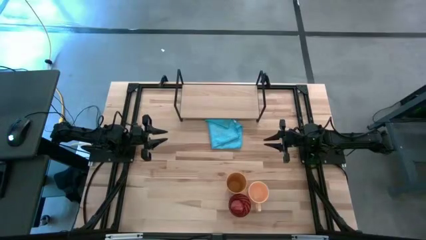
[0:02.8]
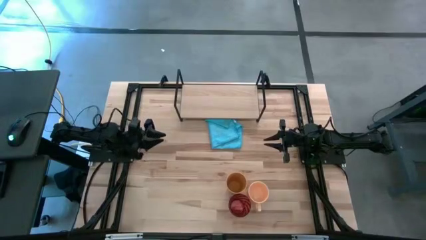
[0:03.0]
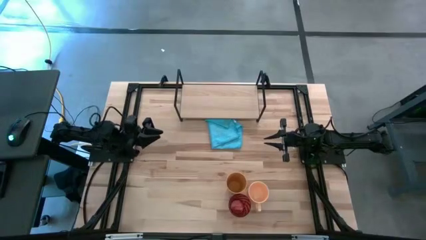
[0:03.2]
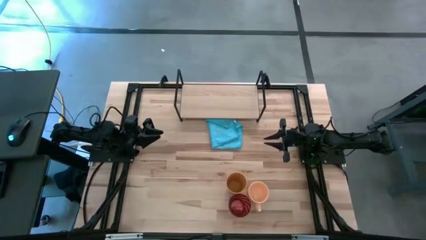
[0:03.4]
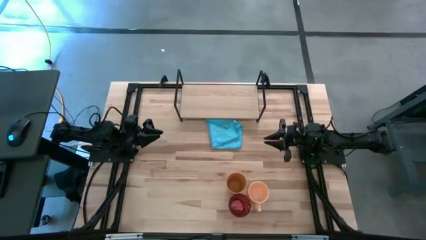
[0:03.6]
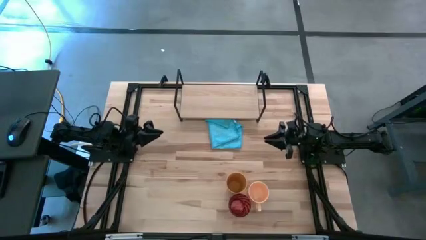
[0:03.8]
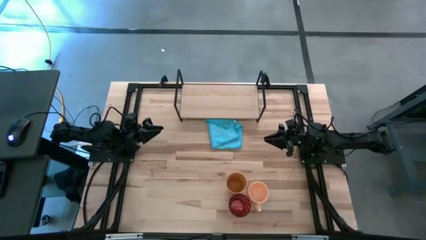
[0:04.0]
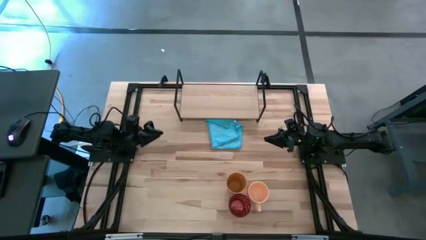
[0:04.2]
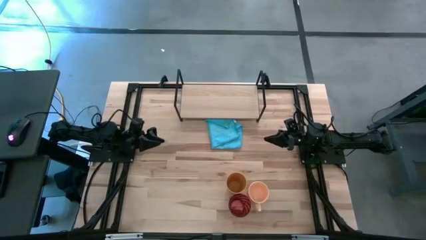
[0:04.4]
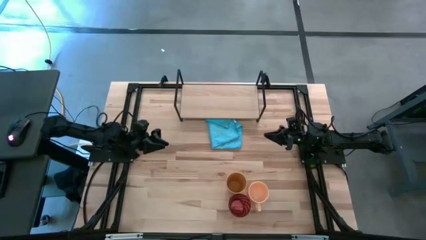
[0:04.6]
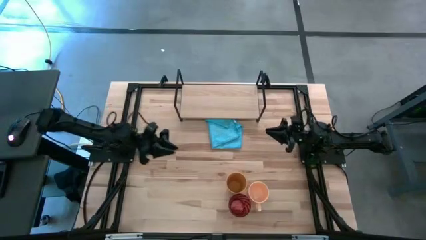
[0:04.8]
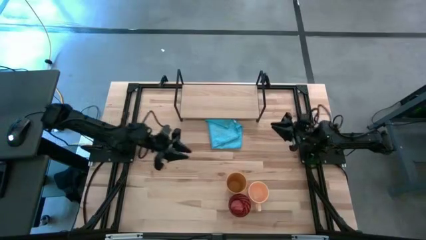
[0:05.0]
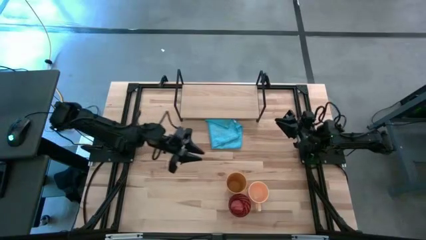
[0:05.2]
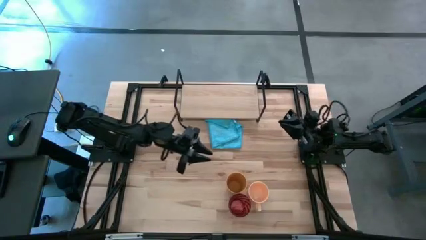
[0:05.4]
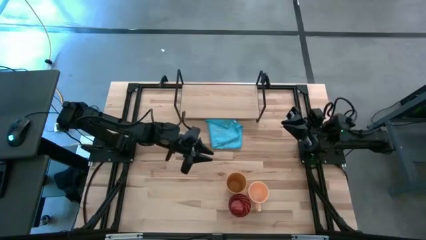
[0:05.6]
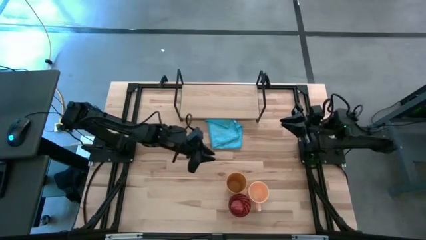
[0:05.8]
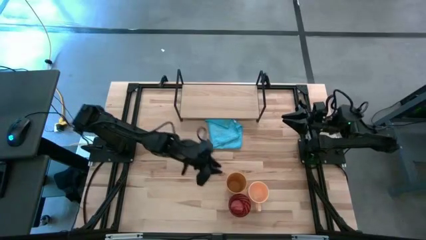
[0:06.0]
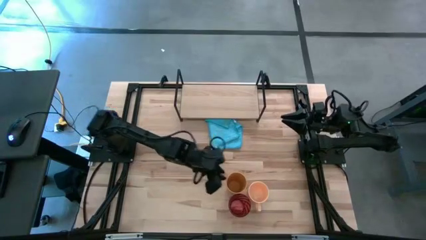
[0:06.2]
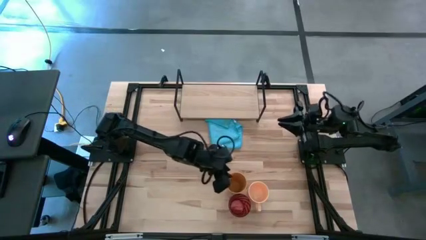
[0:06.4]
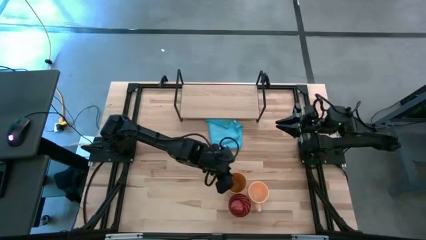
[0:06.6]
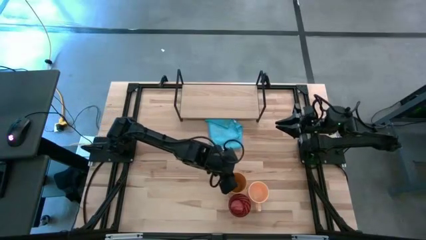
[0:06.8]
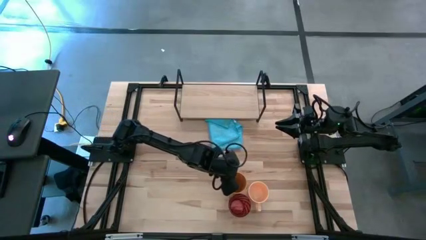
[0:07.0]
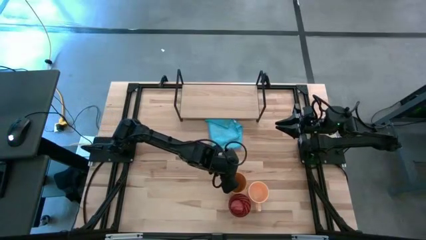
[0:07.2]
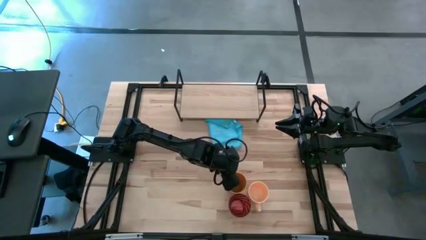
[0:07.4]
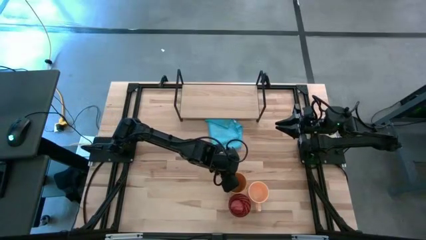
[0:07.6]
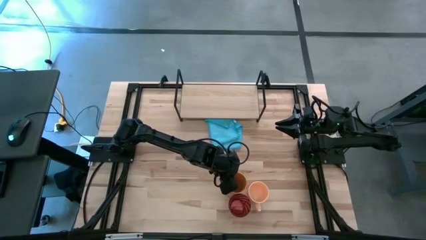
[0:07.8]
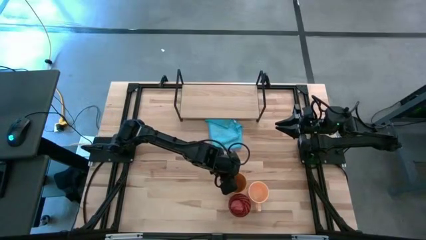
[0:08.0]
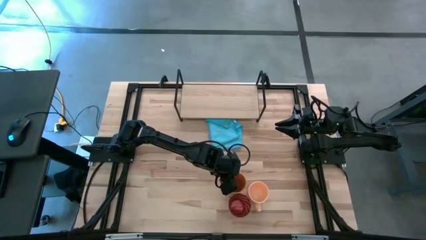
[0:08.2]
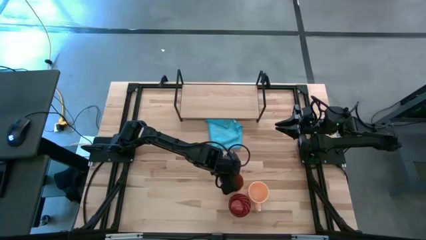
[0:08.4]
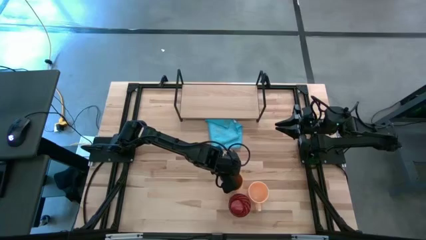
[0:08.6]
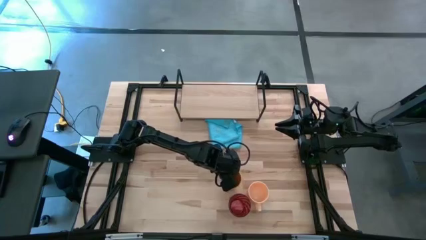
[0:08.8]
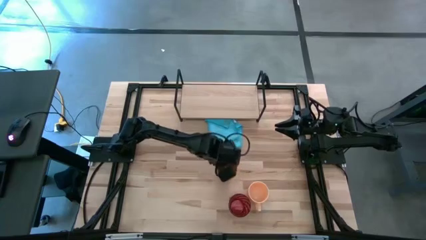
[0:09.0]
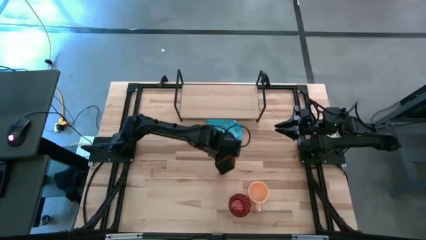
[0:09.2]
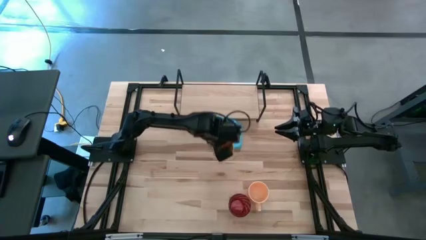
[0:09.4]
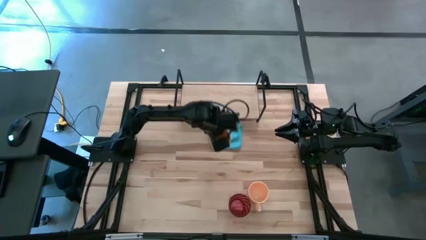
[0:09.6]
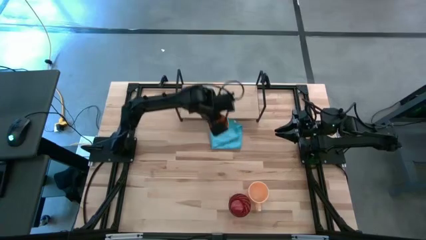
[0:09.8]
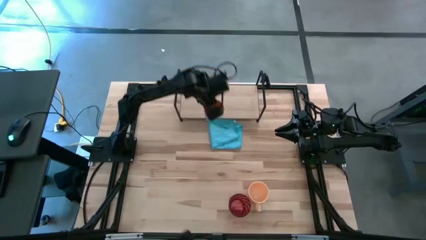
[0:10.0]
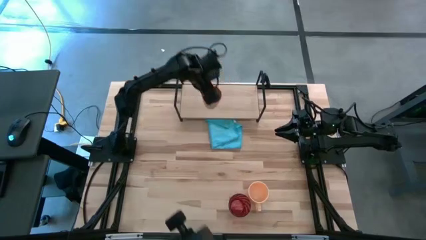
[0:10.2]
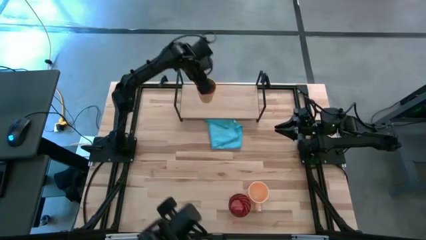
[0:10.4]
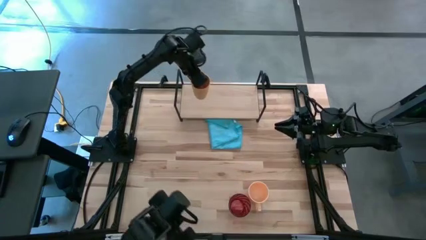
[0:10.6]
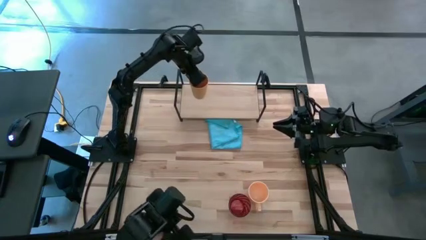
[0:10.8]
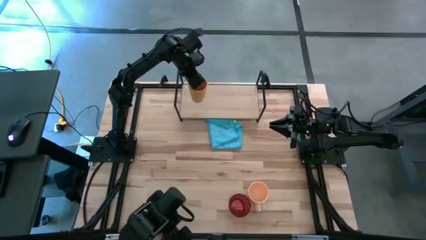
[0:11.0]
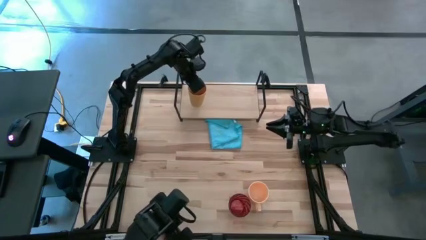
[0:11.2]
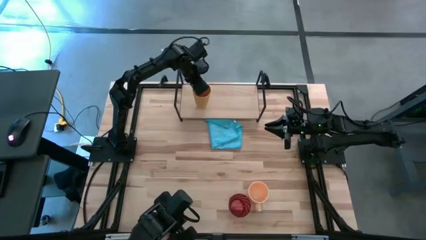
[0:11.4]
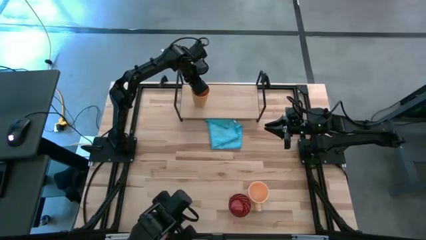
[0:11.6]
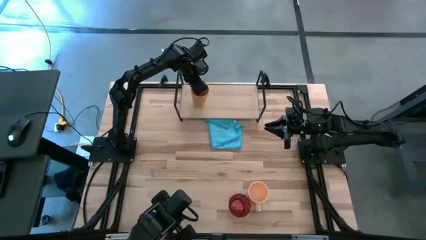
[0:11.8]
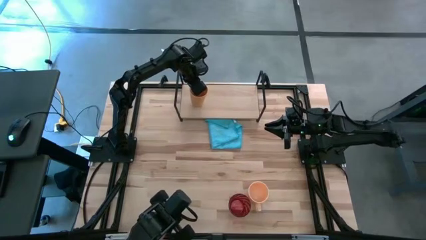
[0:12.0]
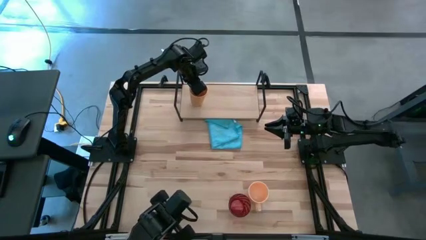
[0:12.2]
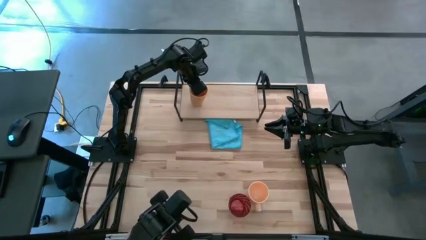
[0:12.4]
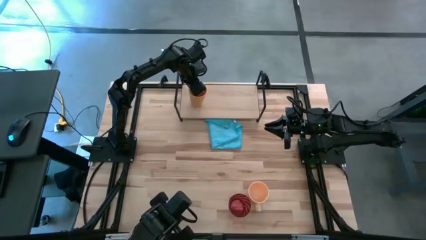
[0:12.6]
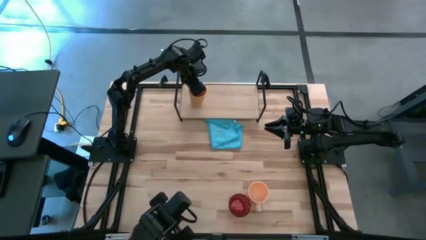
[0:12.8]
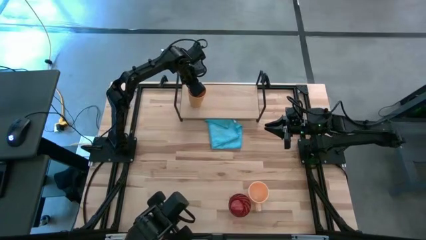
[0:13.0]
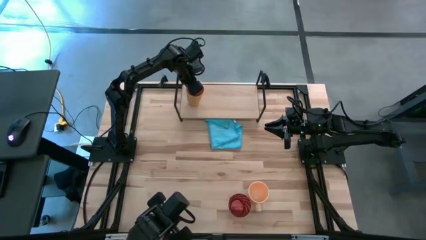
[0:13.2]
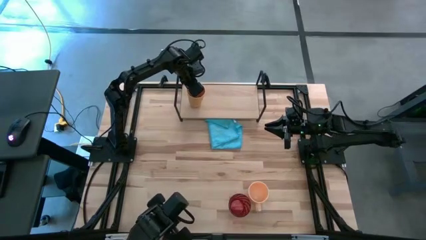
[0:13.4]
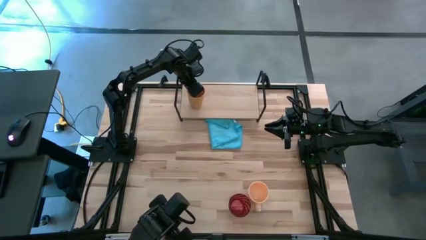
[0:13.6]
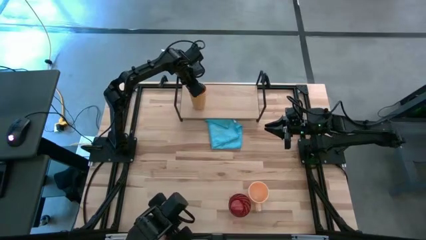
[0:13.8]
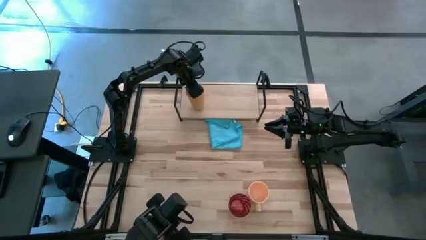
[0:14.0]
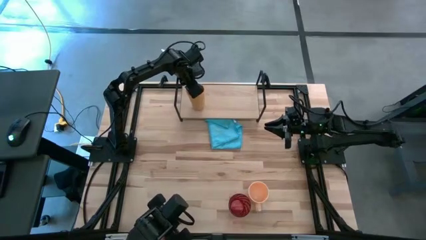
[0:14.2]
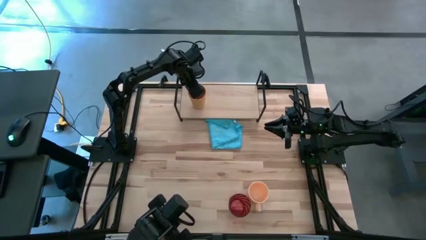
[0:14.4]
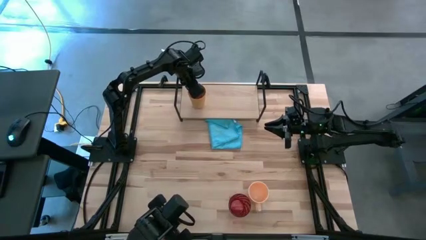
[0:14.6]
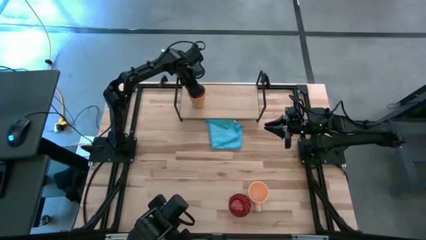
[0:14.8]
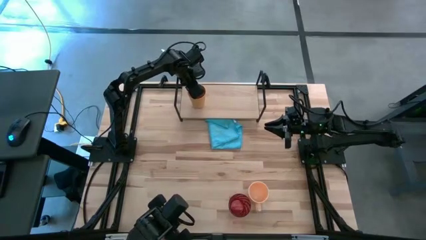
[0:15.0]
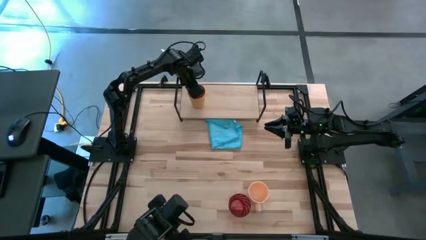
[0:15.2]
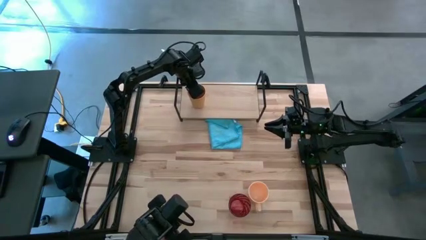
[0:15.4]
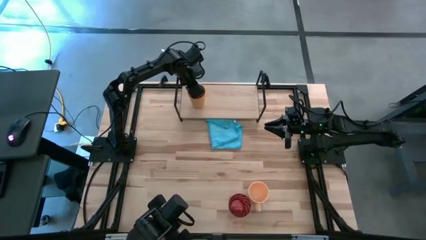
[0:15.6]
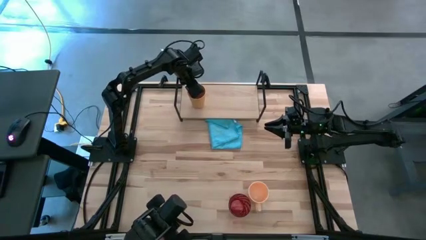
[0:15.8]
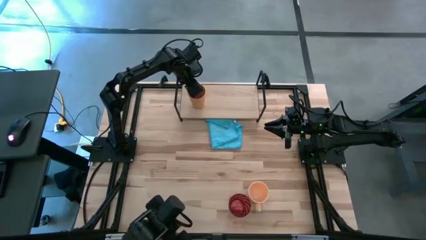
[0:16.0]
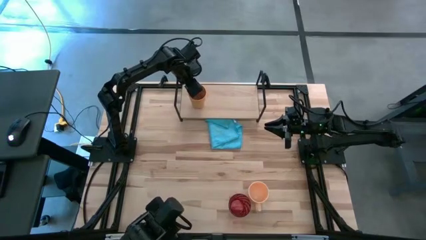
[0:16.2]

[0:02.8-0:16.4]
Task: Stack small to large cups/mugs on shelf
Put the yellow cup on the shelf

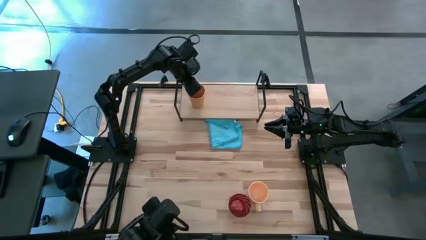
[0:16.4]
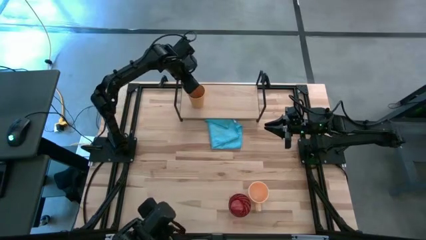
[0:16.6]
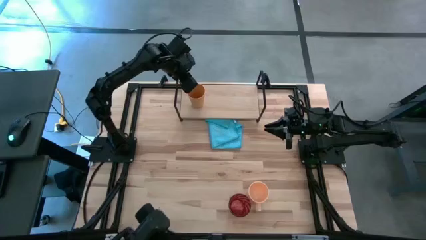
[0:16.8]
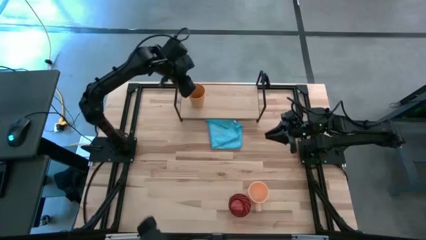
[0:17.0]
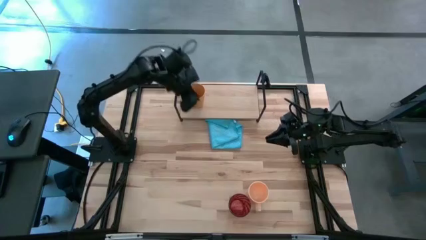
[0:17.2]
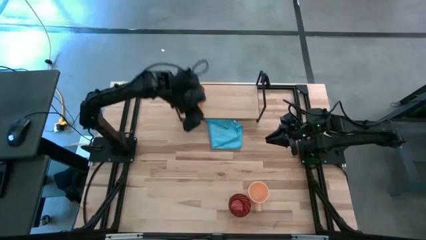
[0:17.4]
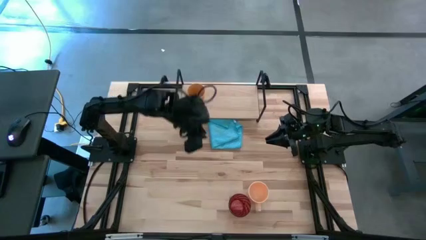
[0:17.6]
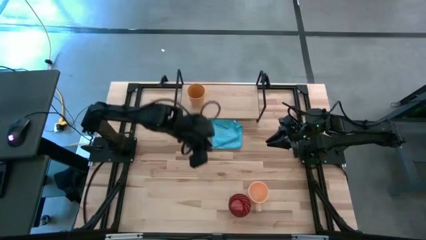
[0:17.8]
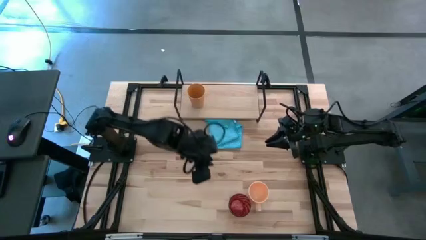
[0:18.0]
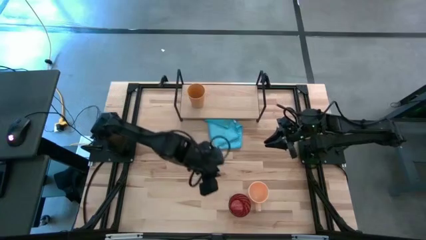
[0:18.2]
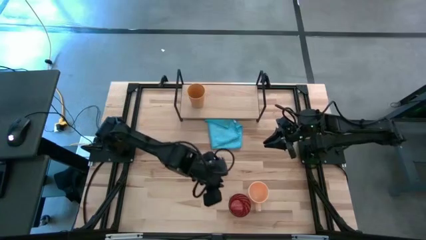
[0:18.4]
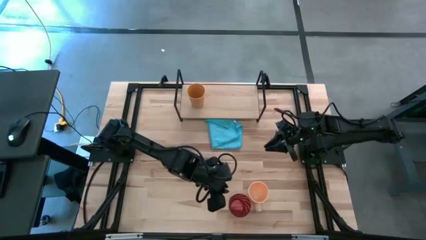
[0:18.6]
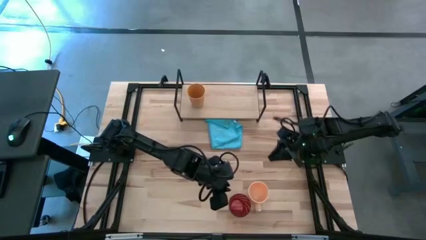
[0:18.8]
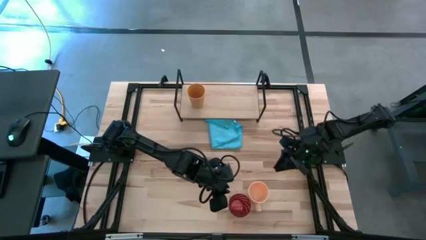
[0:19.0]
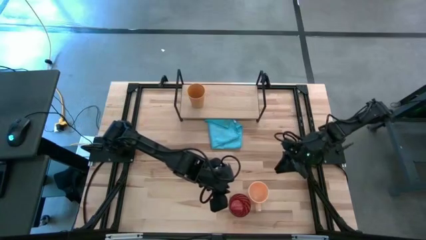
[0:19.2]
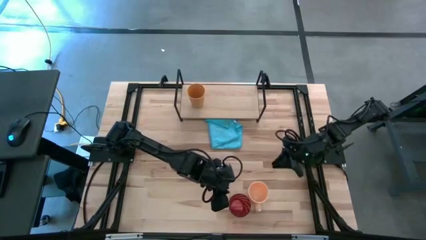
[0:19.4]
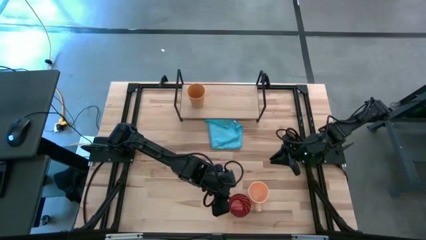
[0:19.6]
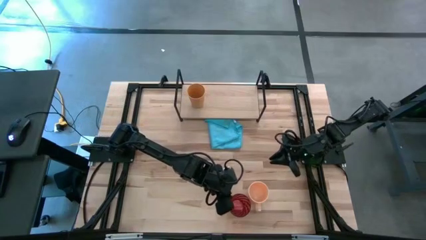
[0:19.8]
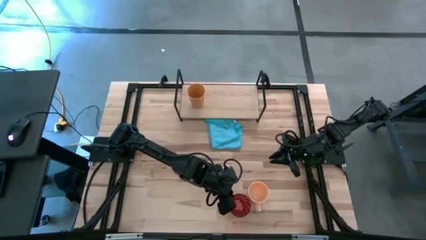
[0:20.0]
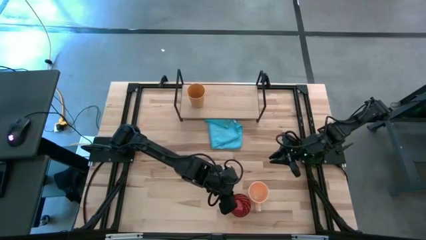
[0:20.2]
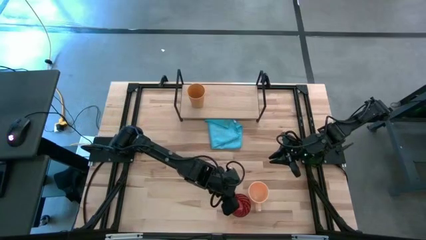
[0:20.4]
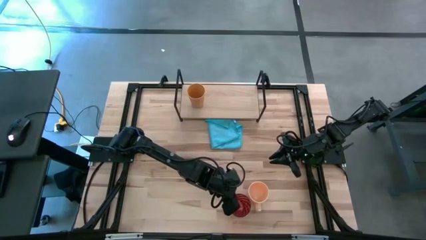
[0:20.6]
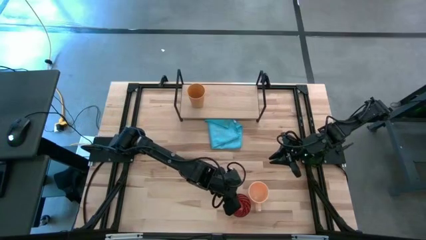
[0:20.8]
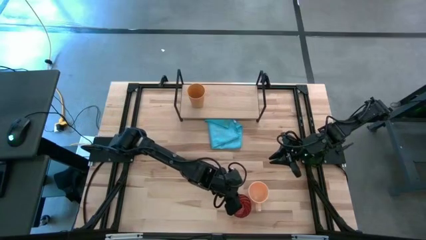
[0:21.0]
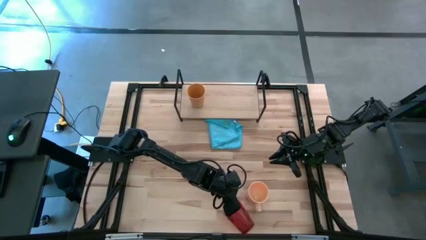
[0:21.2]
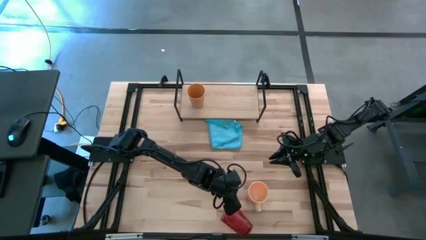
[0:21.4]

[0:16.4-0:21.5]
Put the orange cup on the shelf
